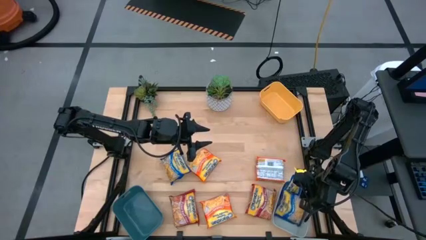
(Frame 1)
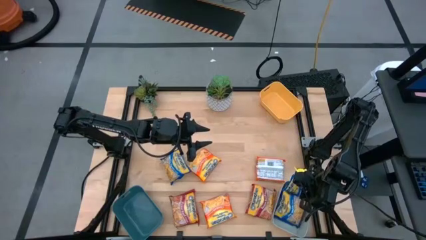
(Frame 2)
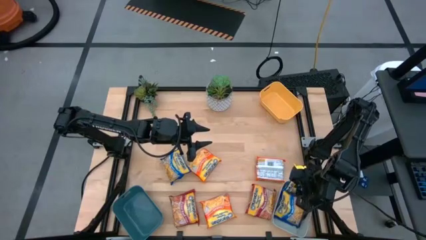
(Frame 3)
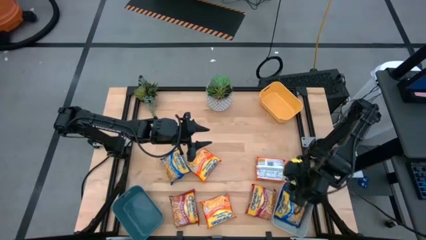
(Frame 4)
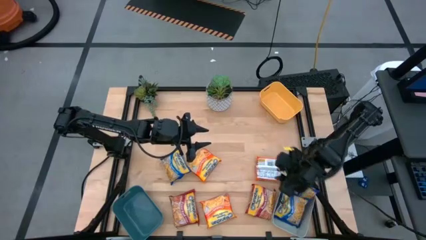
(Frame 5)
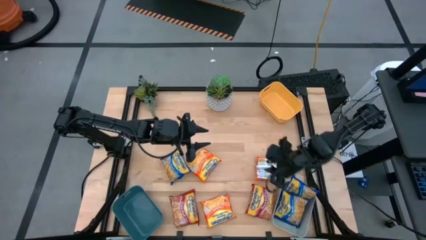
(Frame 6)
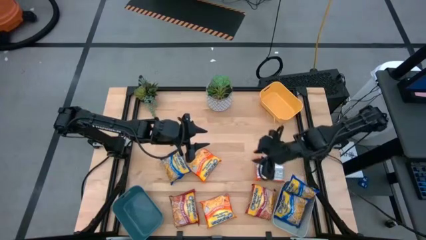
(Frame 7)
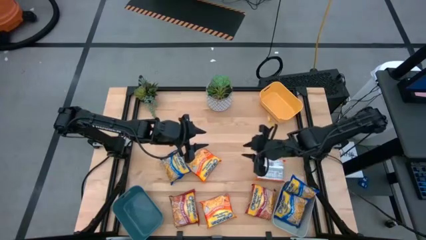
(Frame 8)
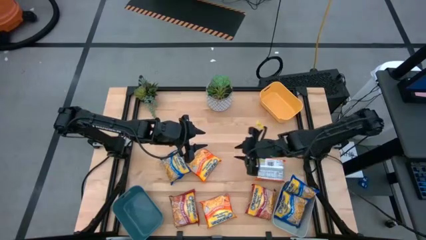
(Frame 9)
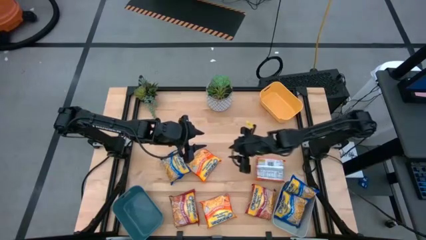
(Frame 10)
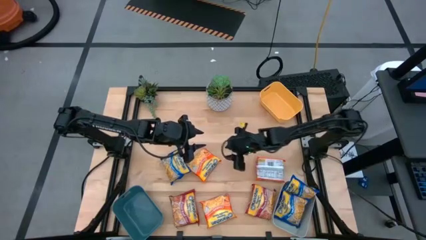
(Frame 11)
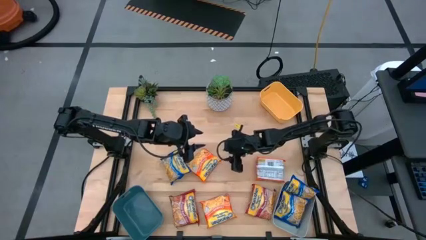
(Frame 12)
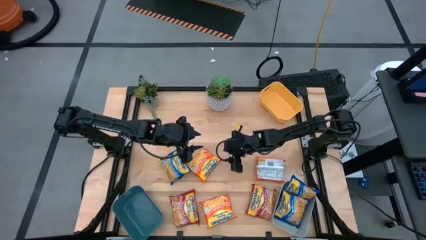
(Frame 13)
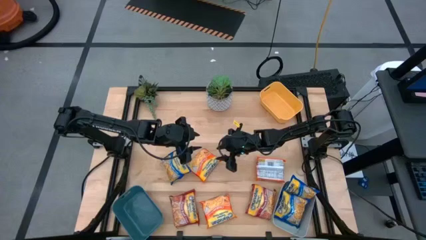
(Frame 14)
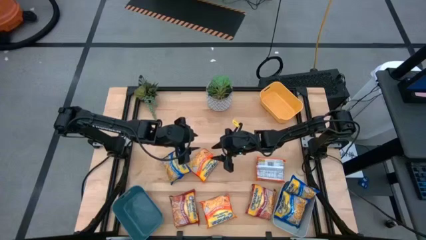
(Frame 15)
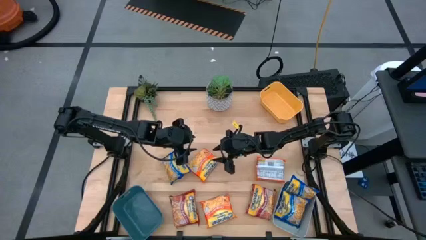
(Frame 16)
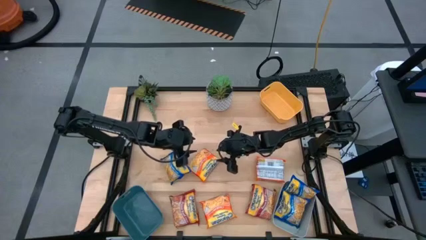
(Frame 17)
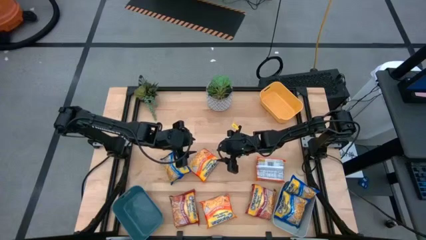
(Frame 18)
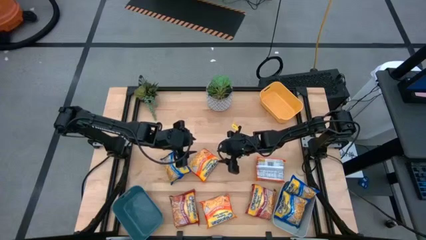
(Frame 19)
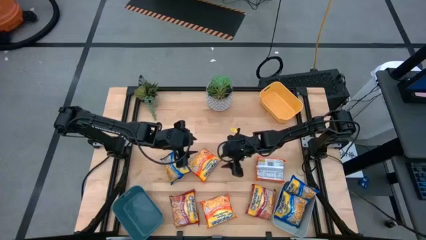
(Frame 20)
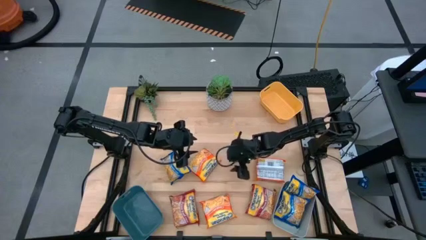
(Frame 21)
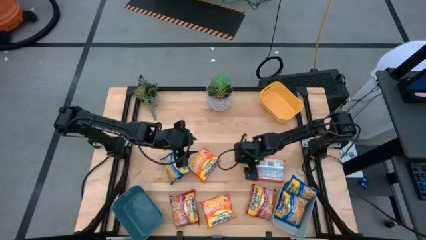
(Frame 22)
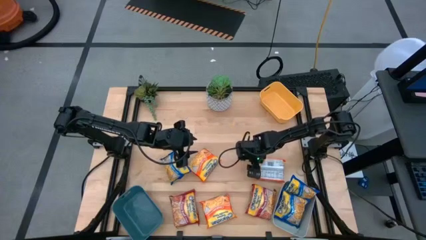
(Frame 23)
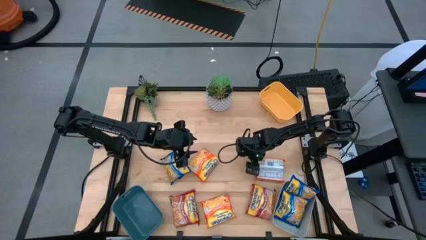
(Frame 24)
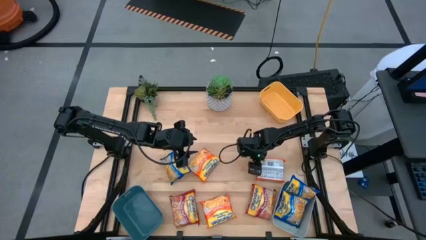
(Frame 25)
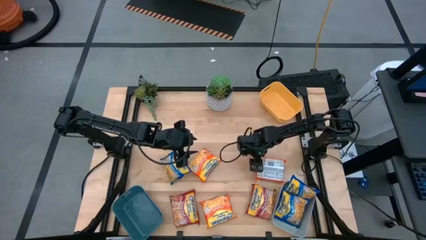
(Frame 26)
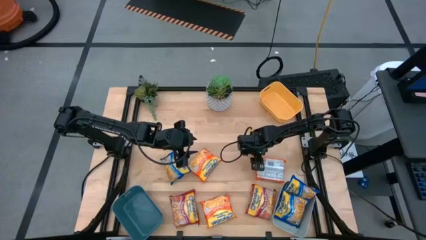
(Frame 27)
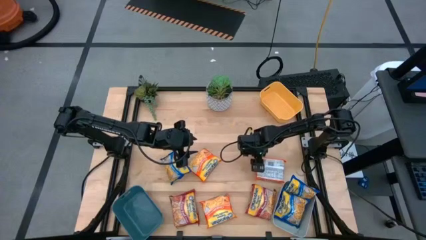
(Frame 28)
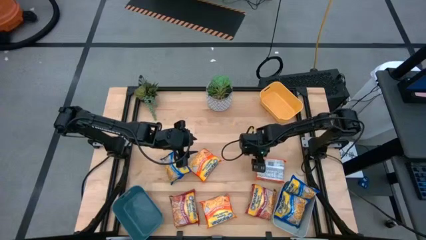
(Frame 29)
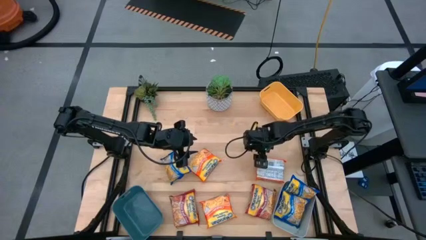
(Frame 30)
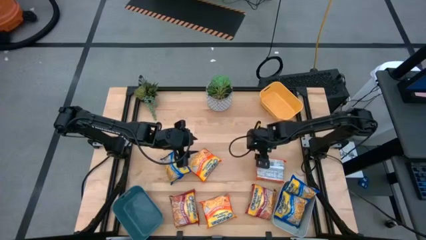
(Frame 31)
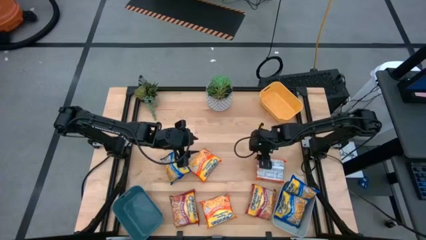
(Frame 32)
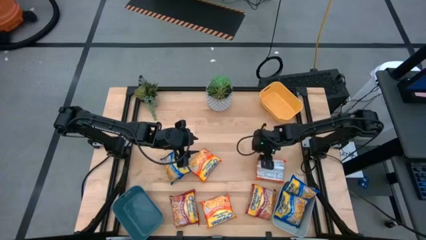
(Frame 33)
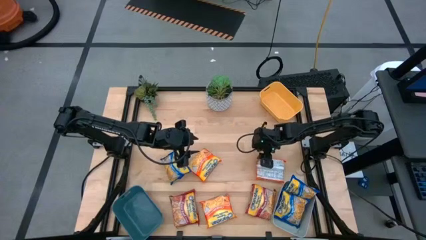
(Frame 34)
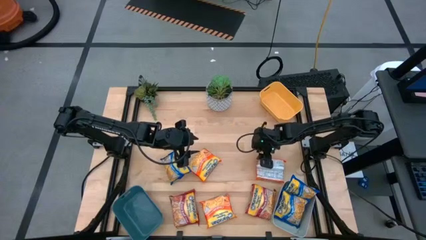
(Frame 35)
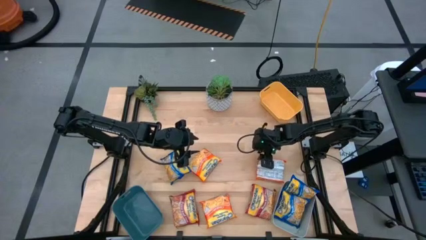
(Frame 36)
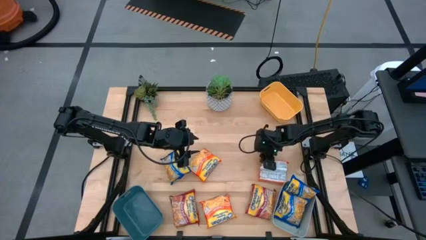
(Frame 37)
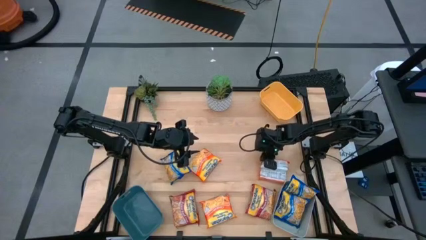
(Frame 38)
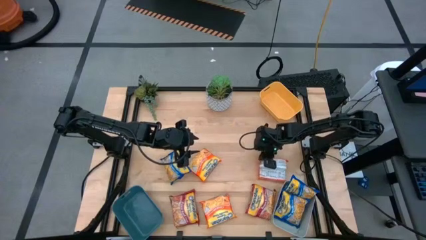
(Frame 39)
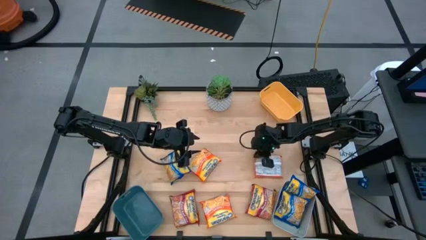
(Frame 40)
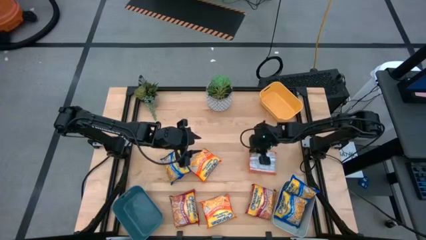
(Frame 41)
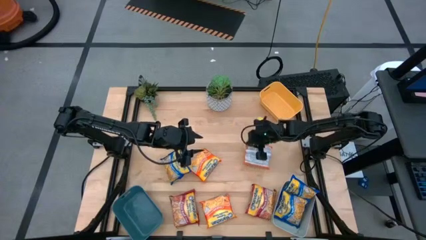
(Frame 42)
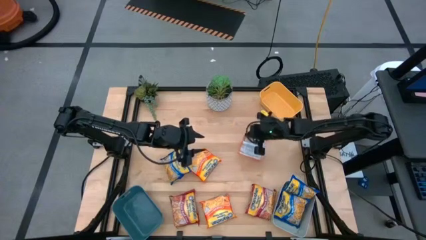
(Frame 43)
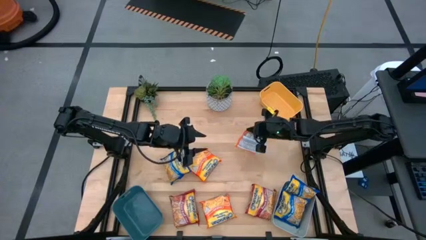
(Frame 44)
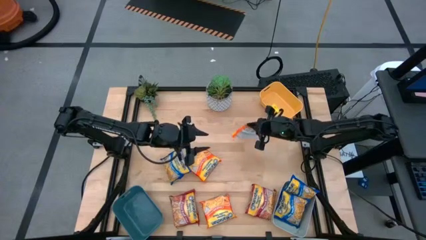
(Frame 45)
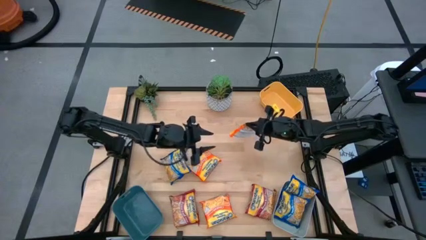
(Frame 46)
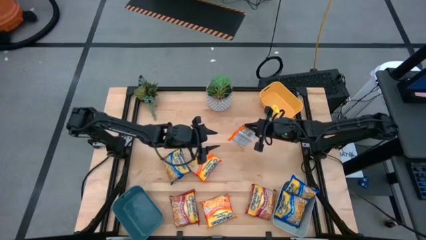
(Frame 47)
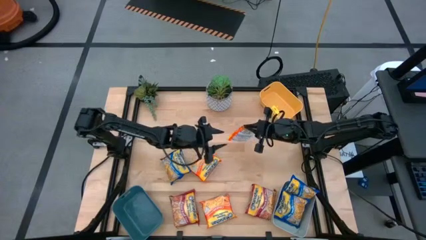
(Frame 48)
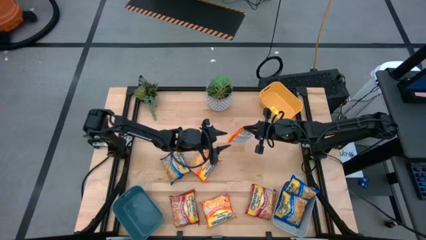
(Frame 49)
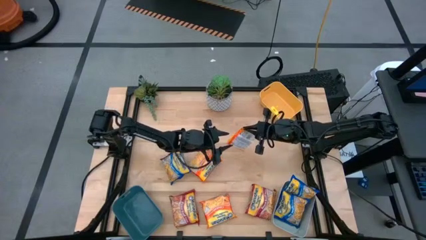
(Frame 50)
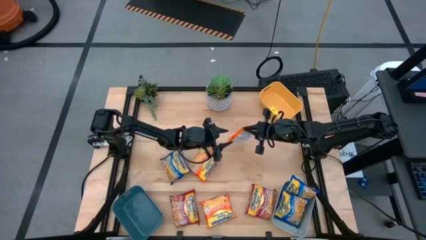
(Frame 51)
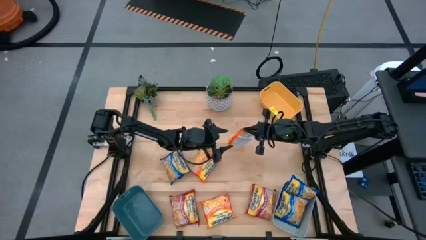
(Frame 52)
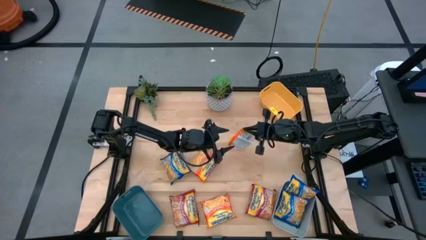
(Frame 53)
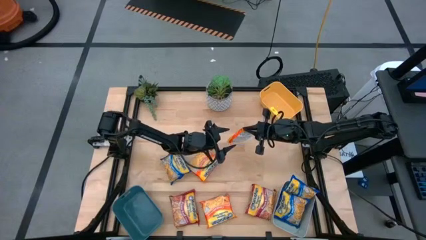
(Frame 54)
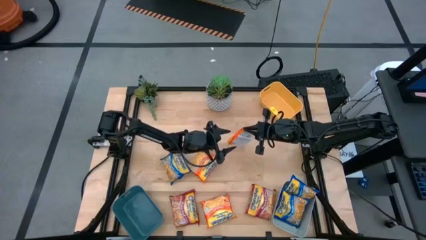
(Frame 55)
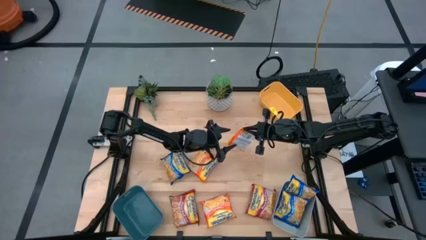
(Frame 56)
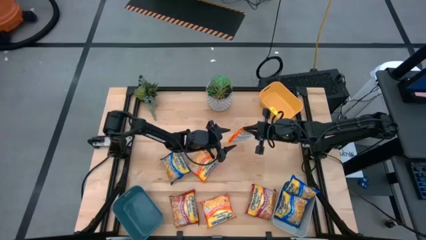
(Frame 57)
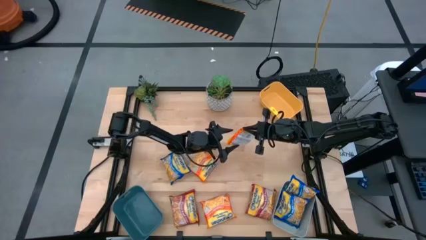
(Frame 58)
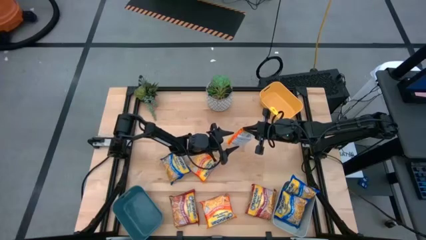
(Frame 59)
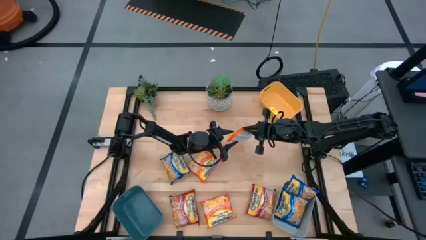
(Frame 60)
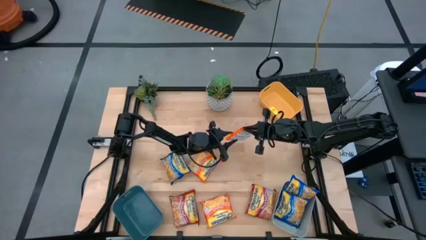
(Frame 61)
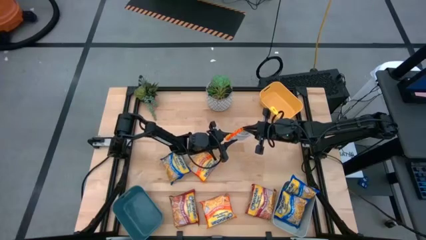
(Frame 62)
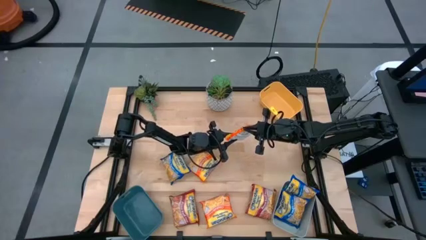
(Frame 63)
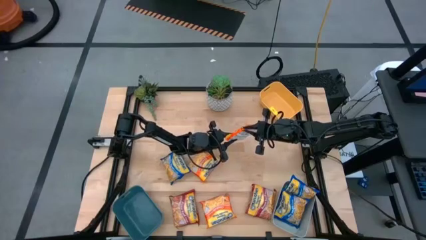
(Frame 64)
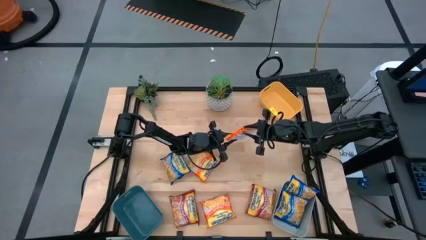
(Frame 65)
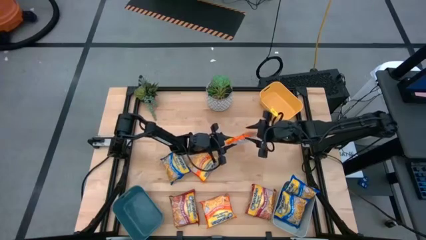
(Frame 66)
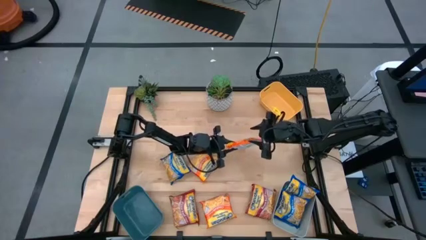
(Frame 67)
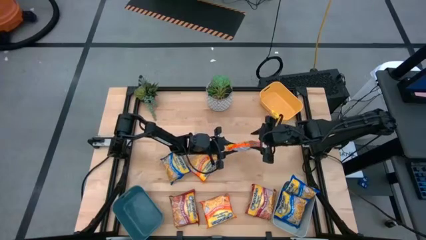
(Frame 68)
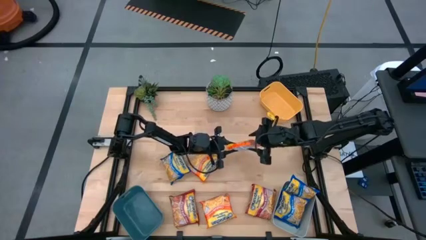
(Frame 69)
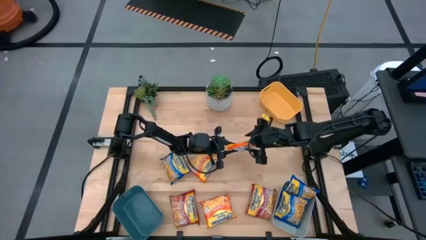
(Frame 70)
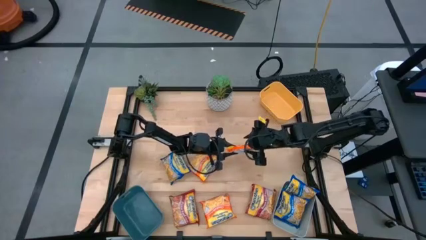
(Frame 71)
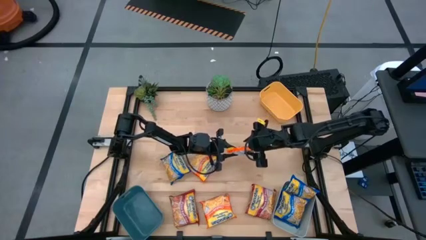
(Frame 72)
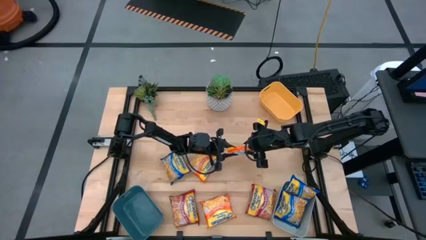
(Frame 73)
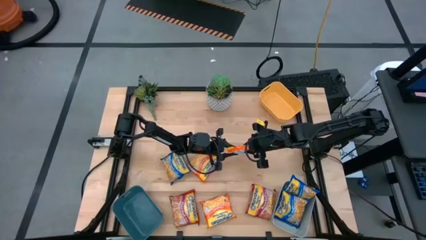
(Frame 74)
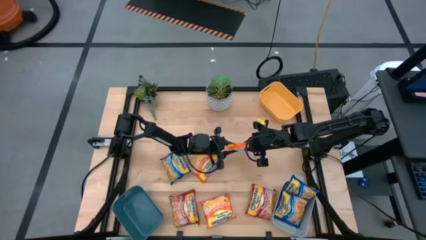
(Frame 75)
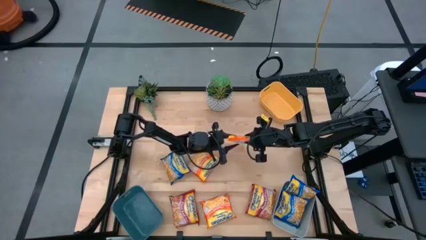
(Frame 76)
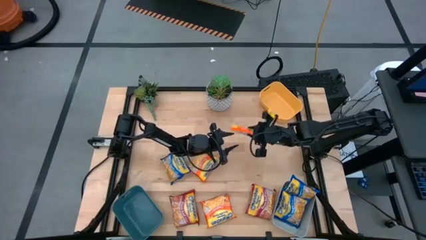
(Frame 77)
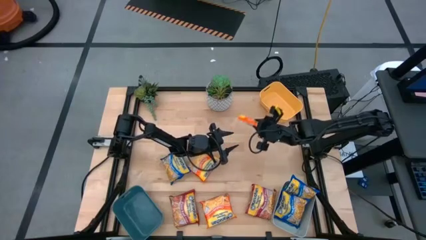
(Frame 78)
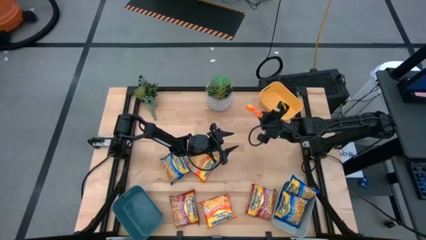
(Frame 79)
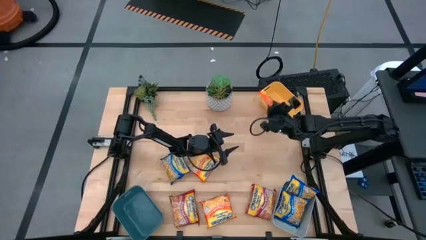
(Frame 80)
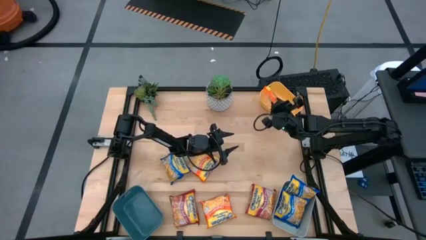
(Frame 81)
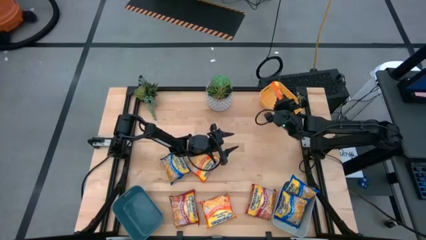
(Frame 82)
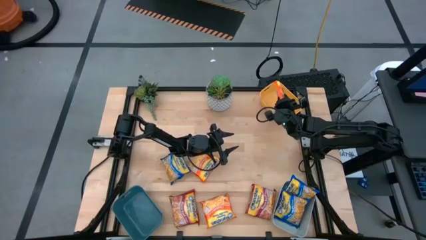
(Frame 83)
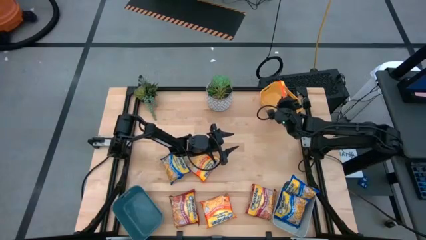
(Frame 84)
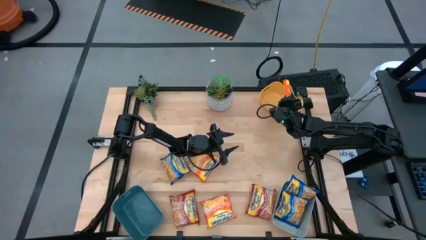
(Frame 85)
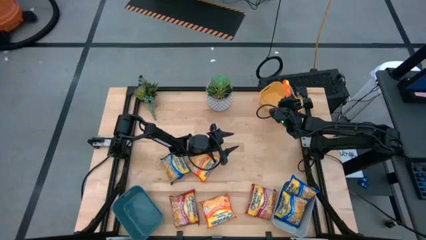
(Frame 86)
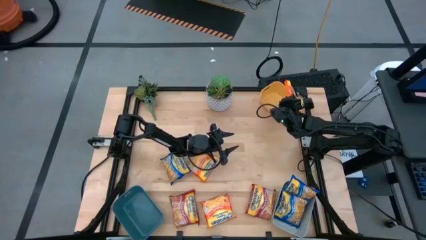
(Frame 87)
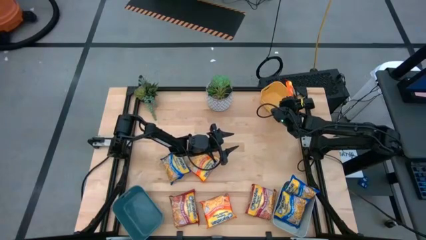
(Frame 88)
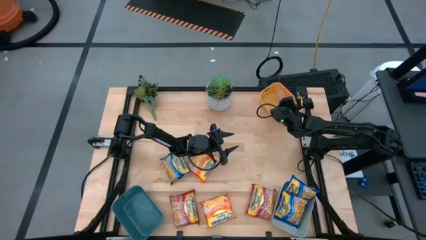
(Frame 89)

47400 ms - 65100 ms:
Task: Sort Maruchan noodles
Put the top right orange noodle pack into the yellow bin
